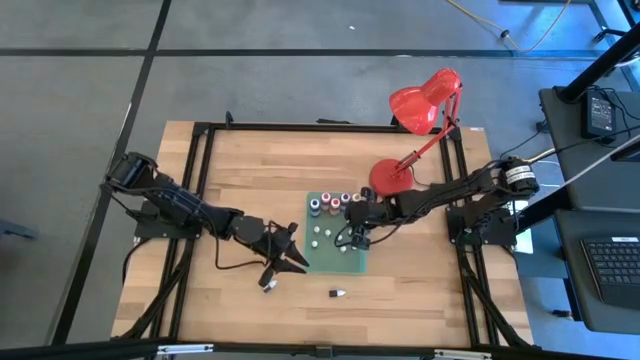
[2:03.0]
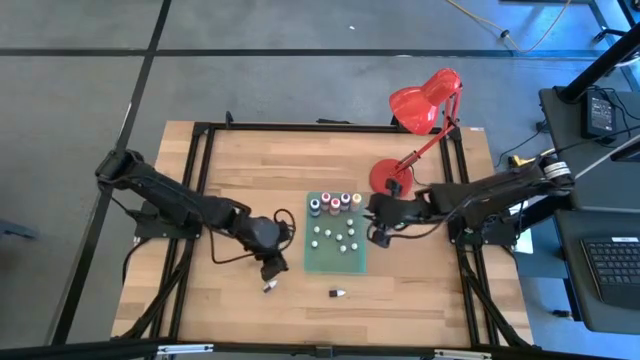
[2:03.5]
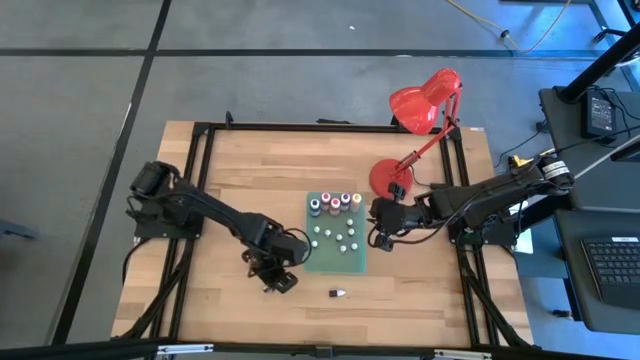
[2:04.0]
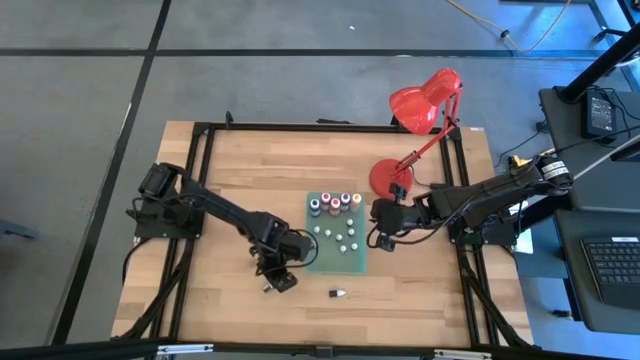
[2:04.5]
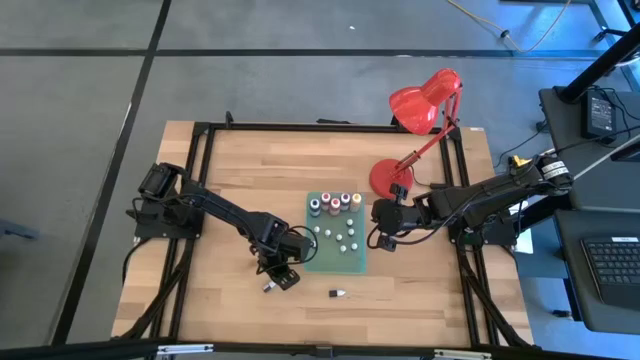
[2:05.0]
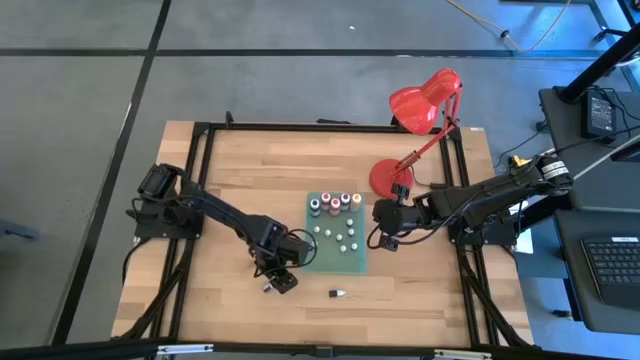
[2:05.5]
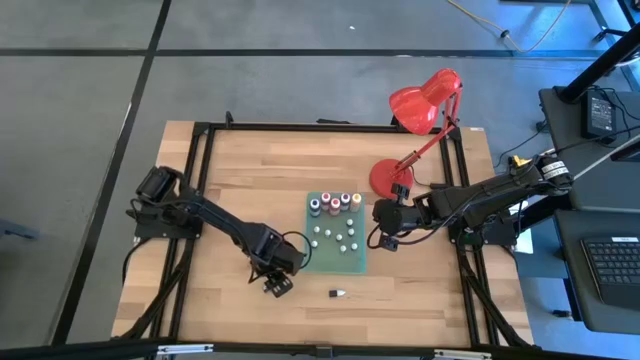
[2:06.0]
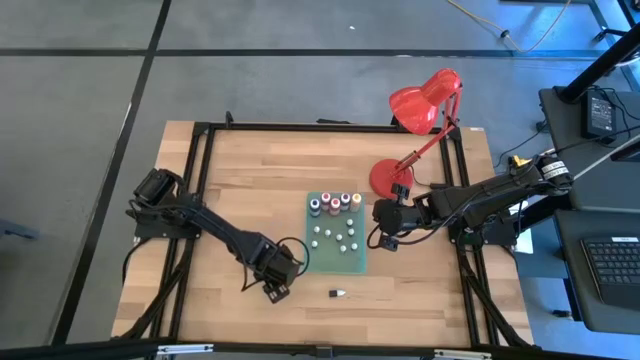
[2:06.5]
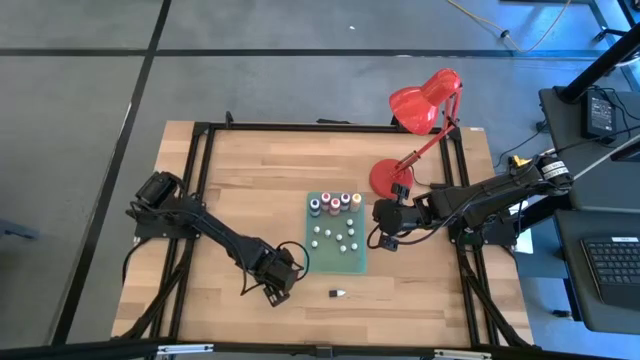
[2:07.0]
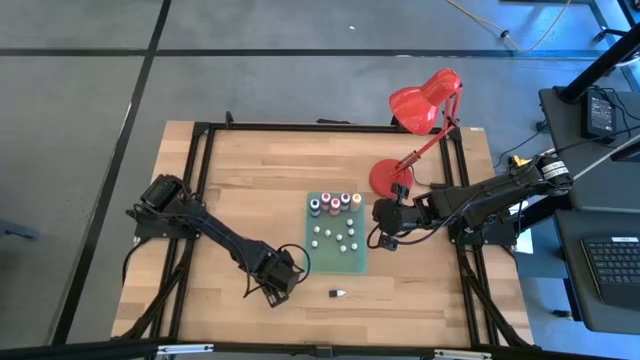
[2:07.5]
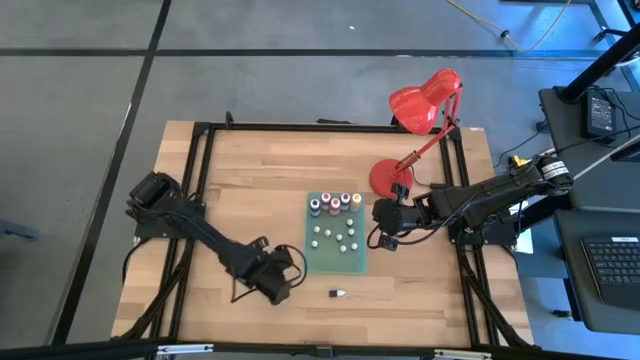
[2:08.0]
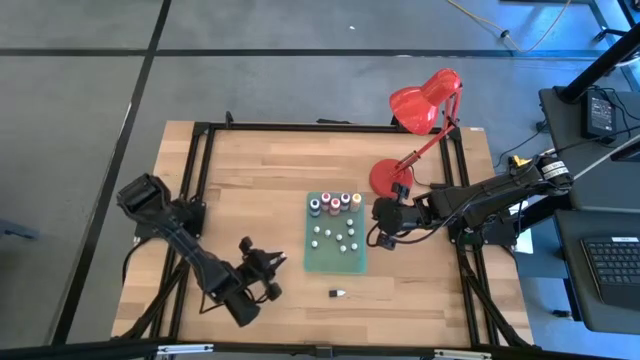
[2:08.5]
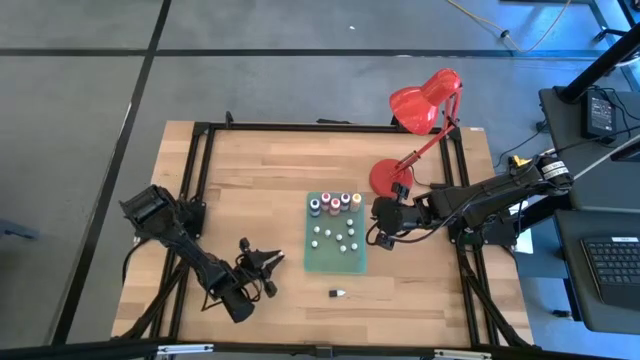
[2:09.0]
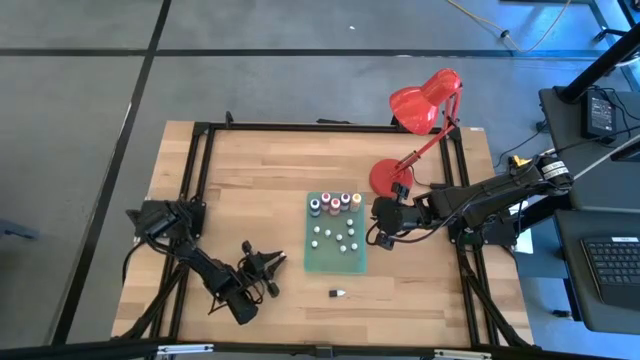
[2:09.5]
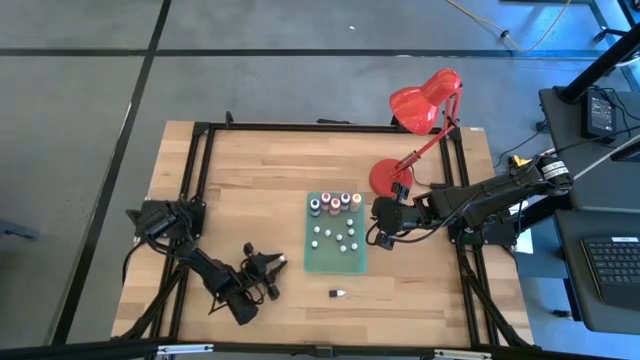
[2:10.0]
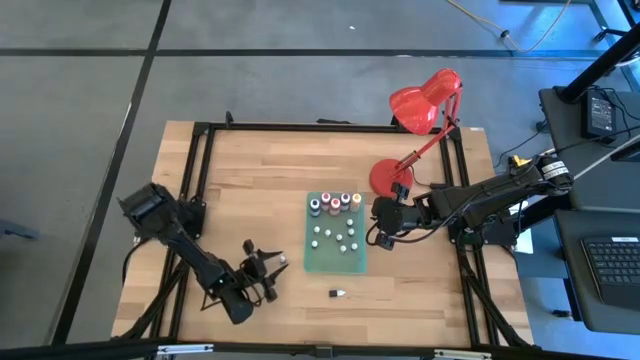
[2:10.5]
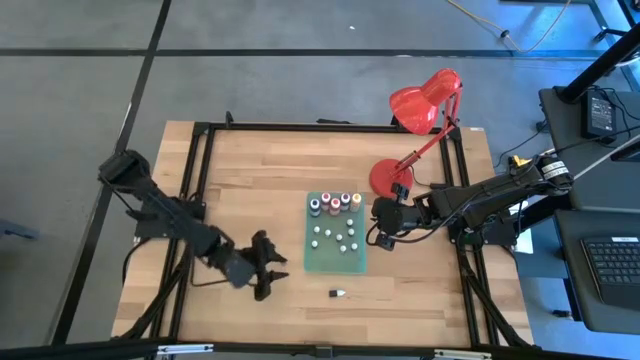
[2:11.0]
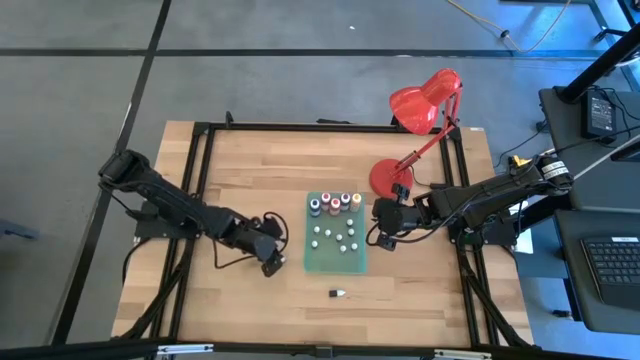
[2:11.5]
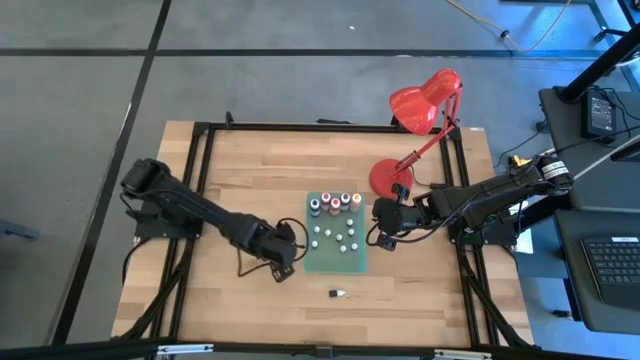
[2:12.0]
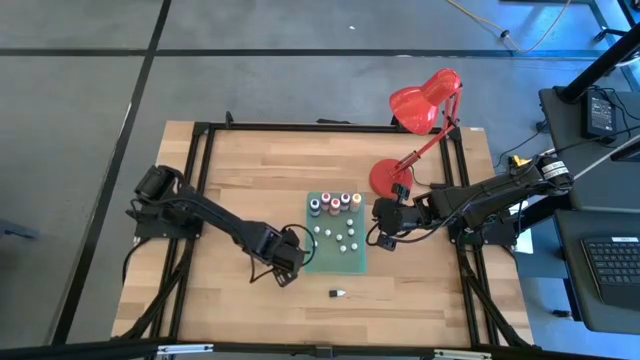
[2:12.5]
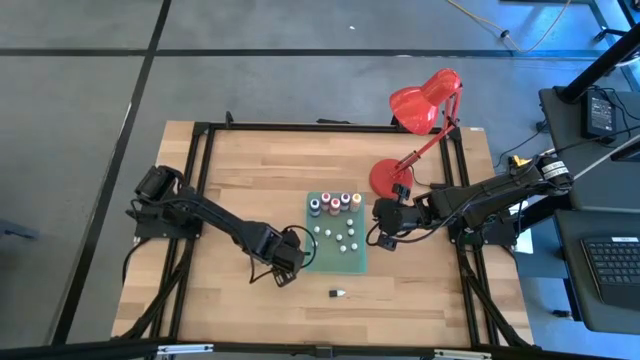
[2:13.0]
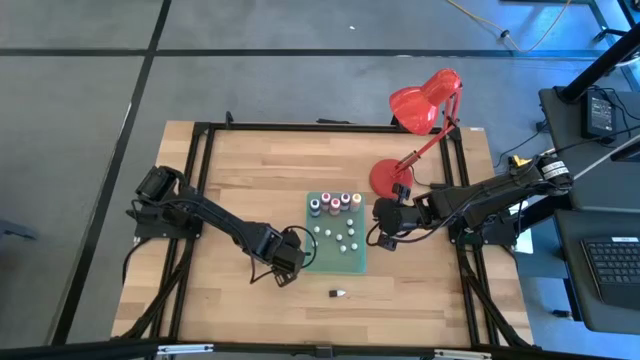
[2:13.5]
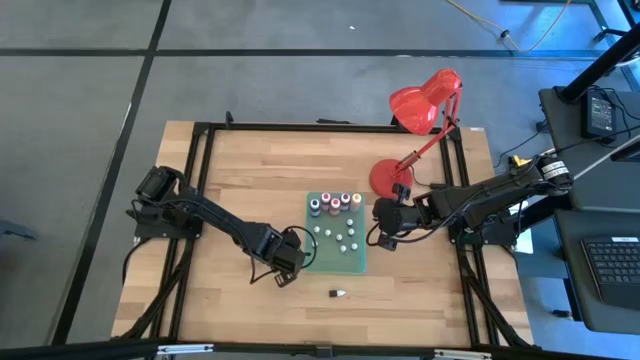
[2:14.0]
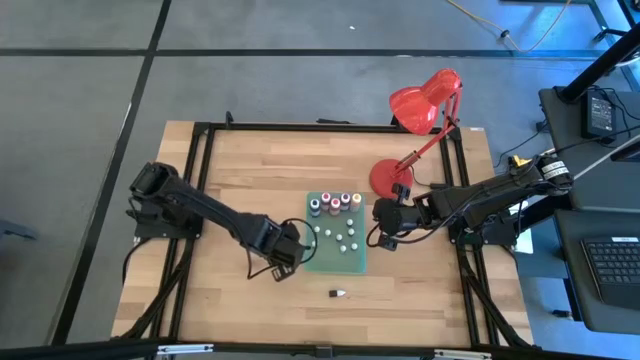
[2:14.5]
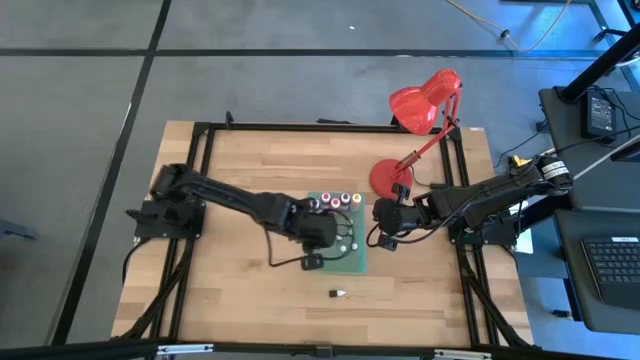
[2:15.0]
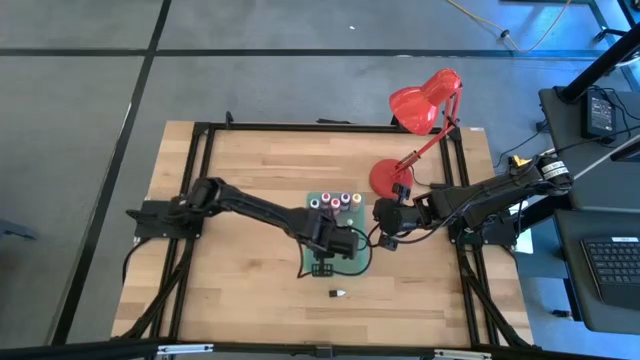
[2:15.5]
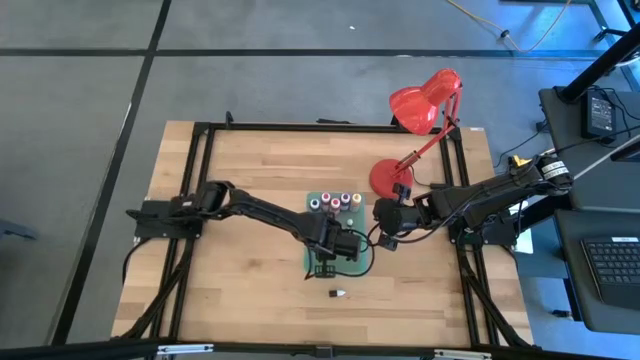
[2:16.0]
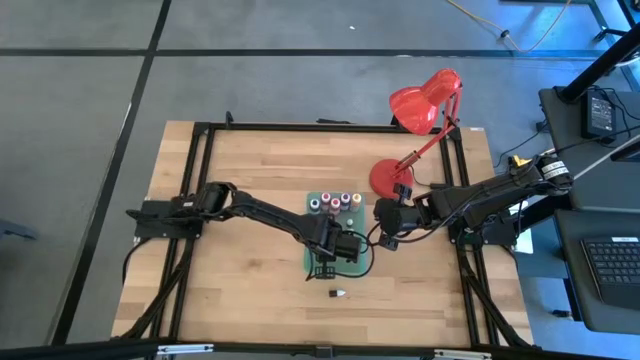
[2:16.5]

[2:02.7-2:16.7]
Task: Pick & Place food coloring
Put the small violet food coloring bottle into the green bin

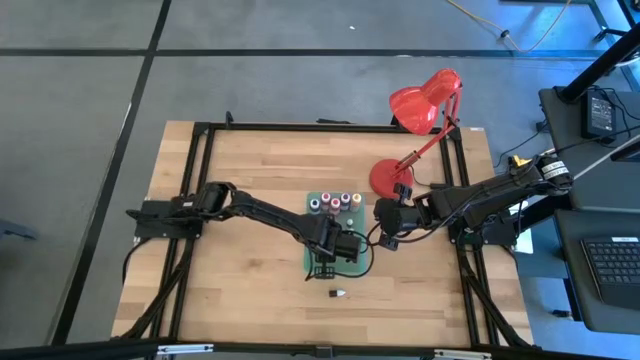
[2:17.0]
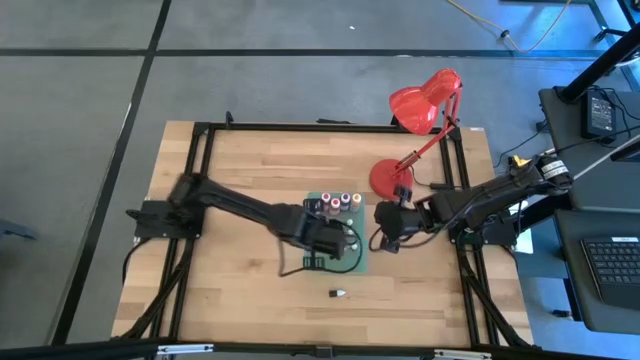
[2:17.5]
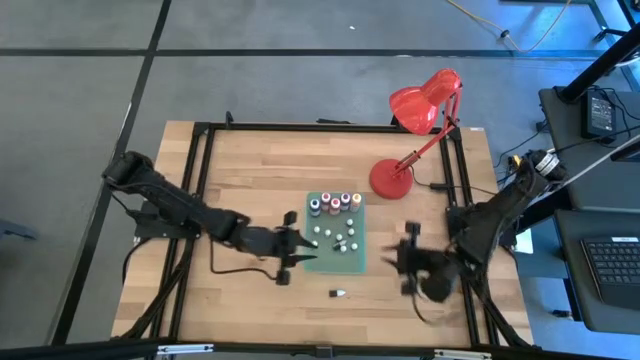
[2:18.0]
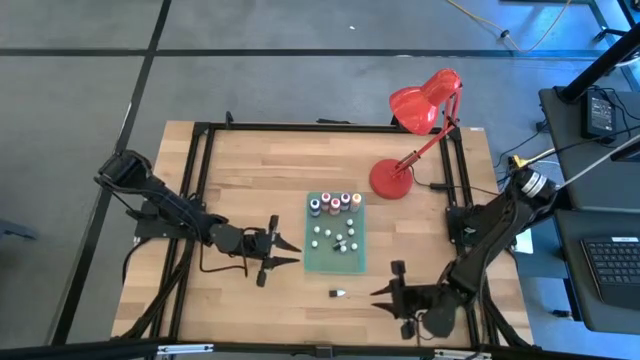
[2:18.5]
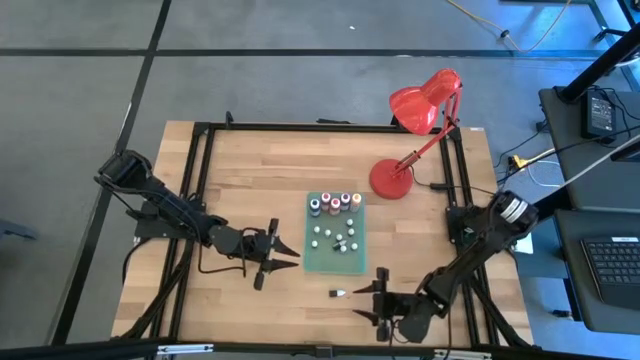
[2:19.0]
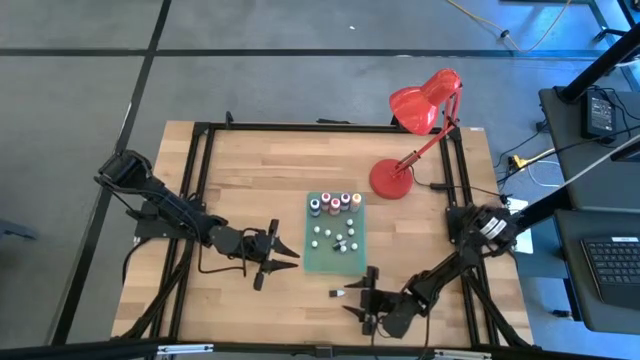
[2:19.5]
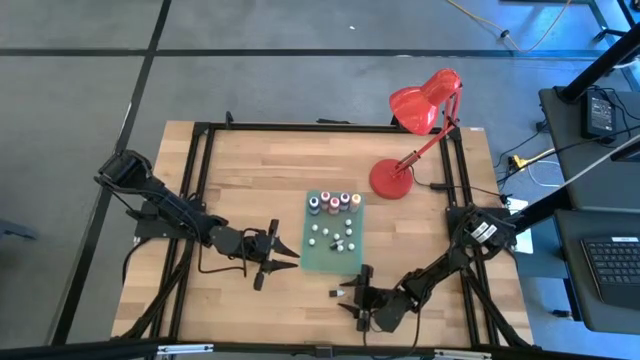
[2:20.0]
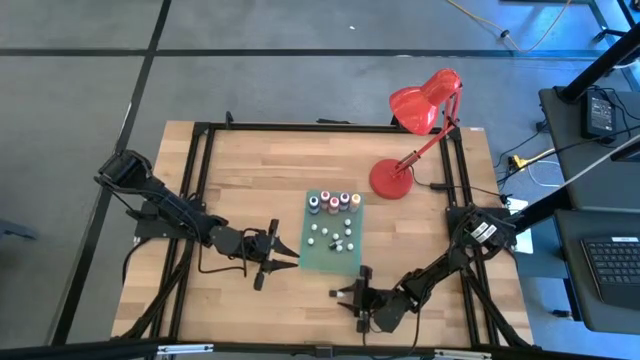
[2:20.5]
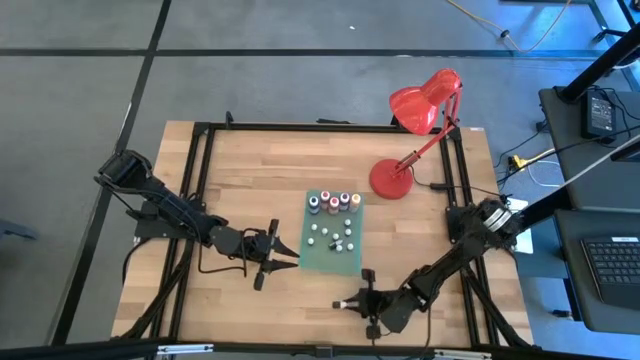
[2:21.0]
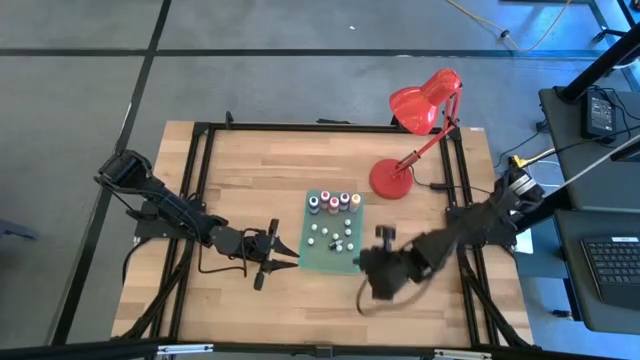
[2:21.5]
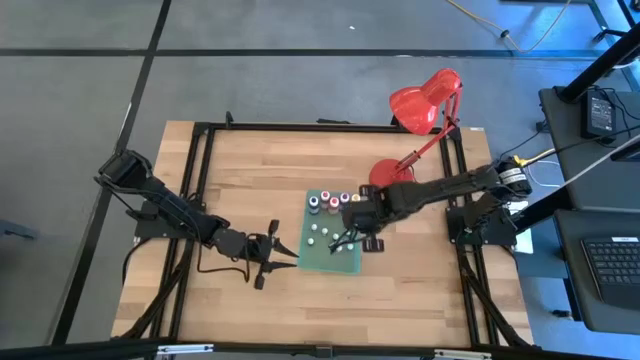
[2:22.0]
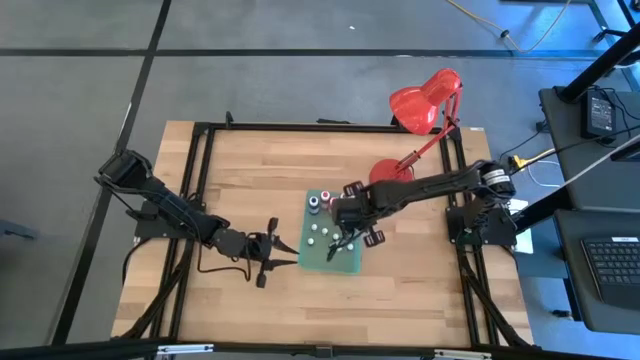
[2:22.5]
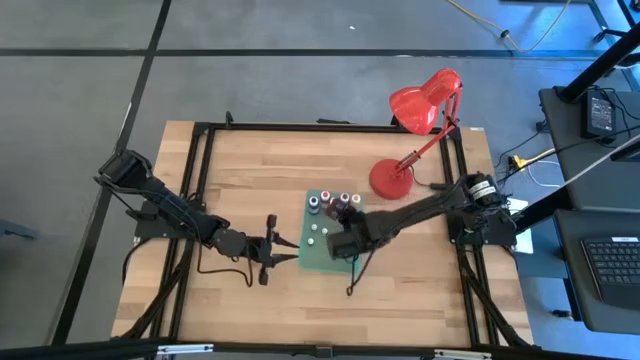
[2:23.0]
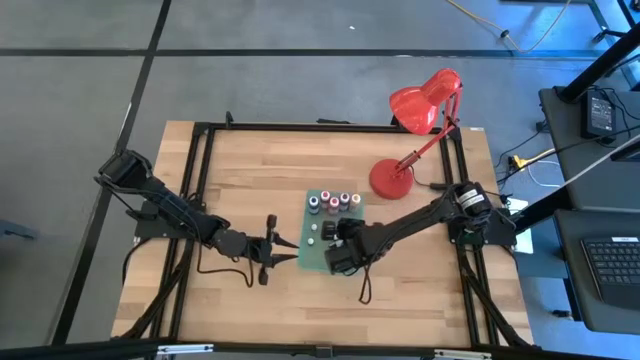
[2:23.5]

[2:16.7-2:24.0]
Put the small brown food coloring bottle into the green bin
